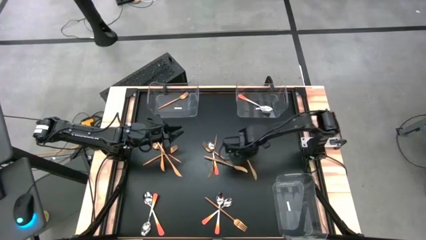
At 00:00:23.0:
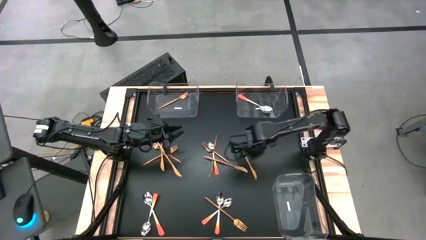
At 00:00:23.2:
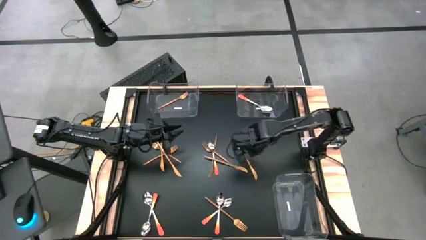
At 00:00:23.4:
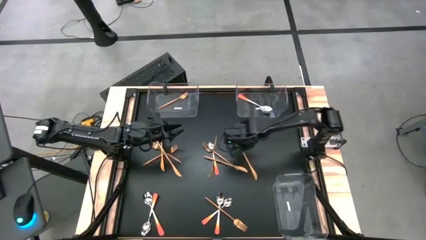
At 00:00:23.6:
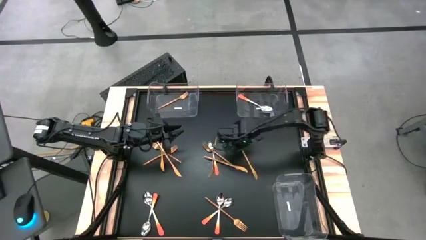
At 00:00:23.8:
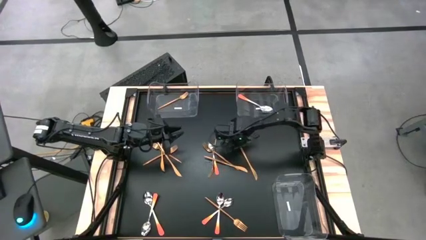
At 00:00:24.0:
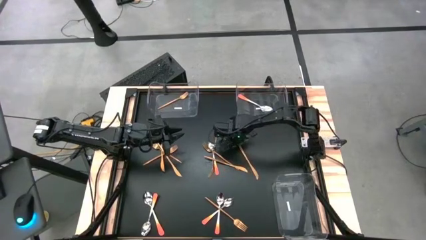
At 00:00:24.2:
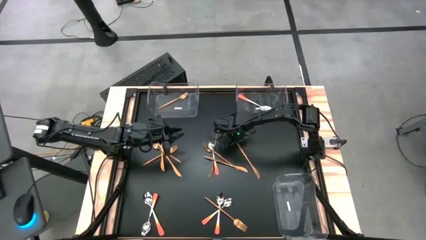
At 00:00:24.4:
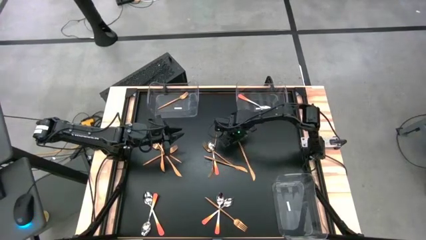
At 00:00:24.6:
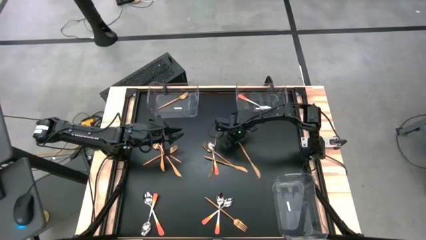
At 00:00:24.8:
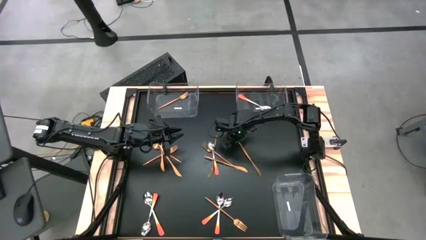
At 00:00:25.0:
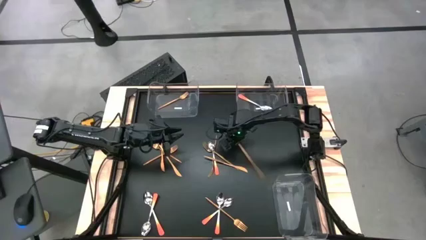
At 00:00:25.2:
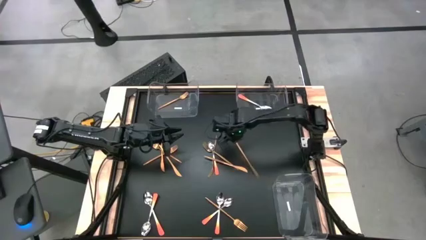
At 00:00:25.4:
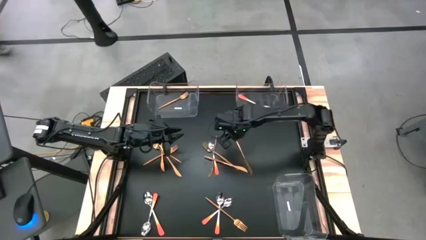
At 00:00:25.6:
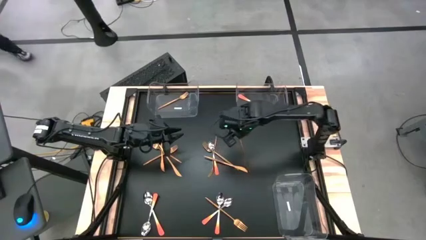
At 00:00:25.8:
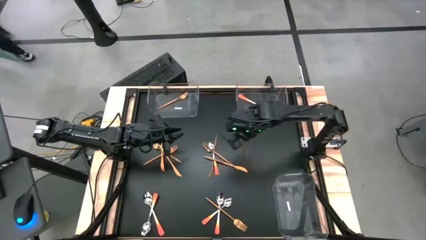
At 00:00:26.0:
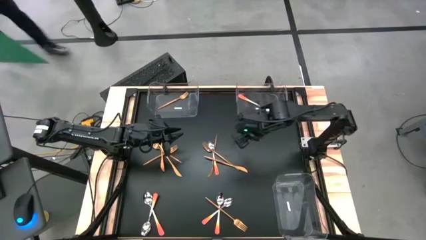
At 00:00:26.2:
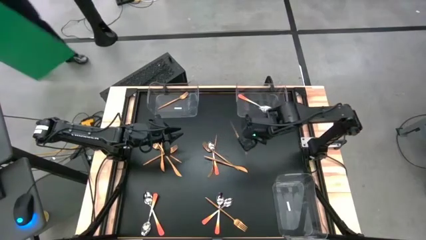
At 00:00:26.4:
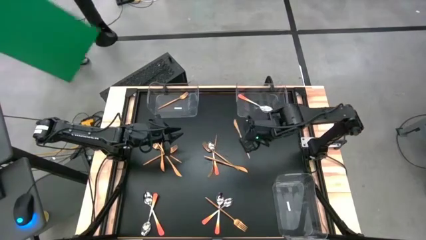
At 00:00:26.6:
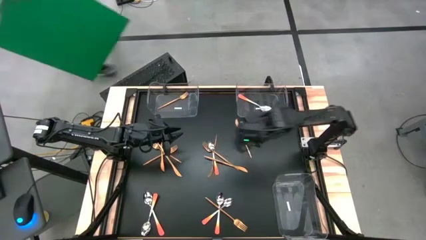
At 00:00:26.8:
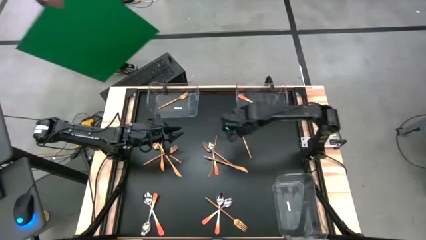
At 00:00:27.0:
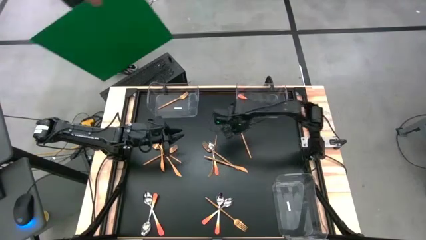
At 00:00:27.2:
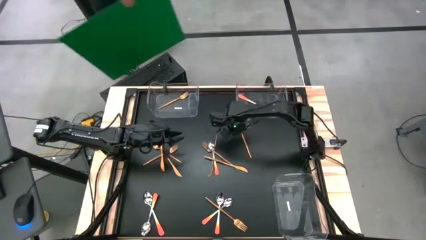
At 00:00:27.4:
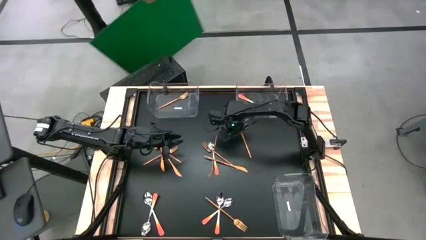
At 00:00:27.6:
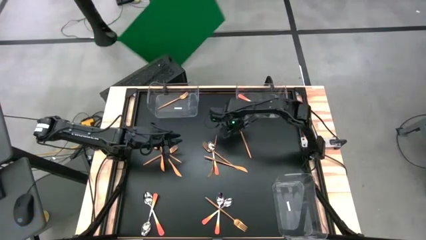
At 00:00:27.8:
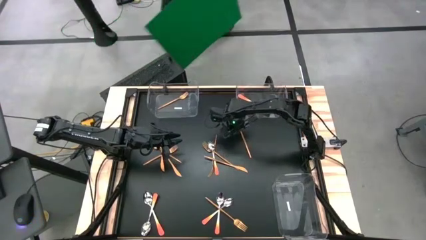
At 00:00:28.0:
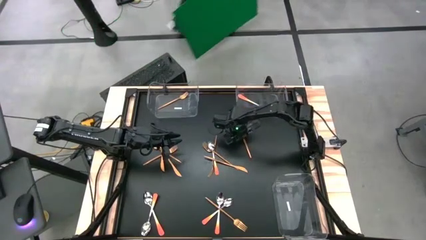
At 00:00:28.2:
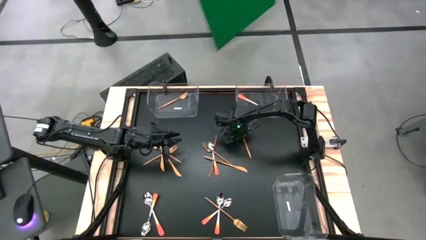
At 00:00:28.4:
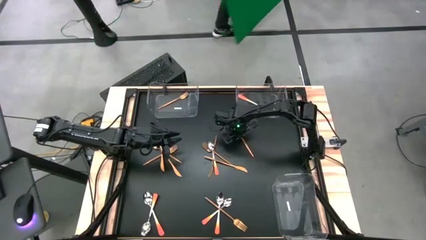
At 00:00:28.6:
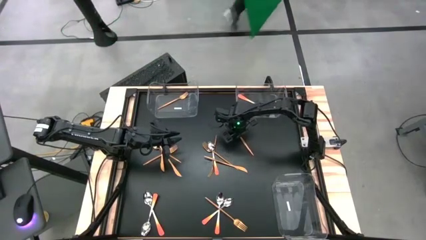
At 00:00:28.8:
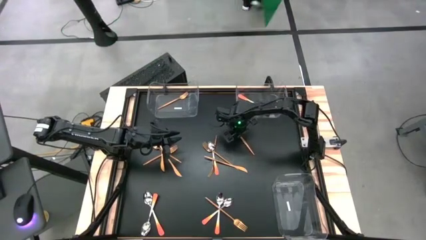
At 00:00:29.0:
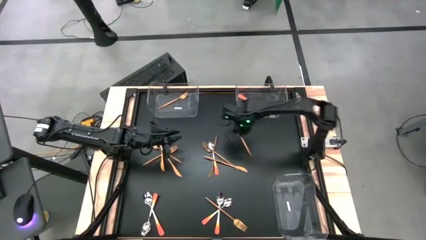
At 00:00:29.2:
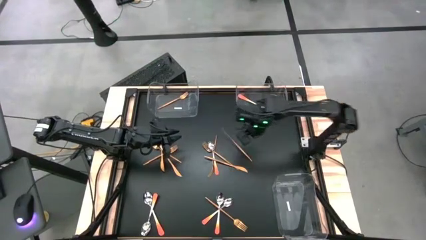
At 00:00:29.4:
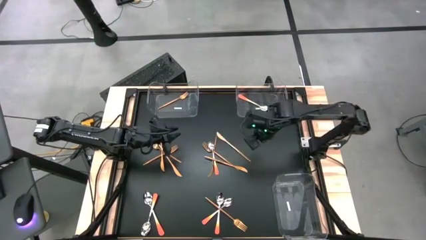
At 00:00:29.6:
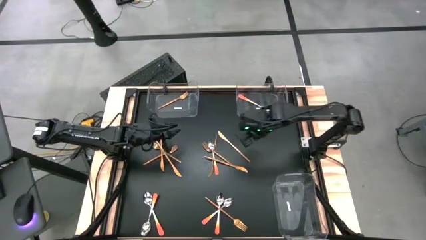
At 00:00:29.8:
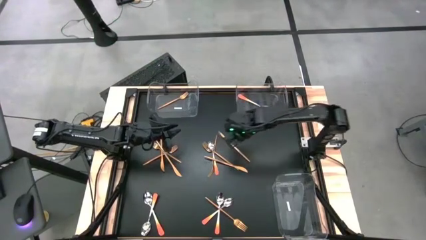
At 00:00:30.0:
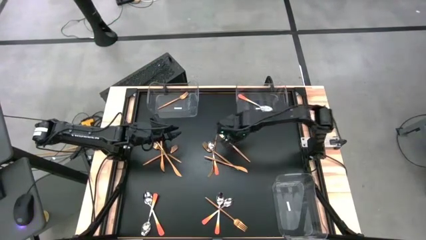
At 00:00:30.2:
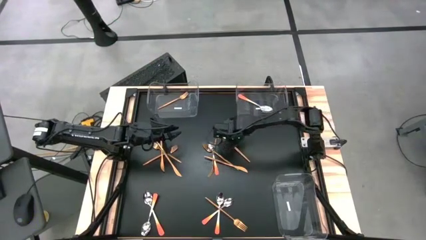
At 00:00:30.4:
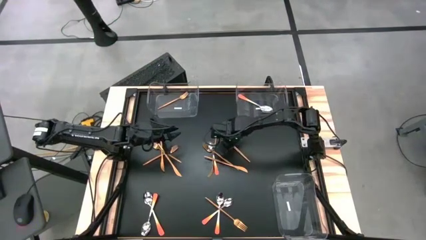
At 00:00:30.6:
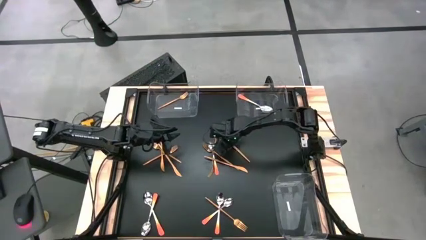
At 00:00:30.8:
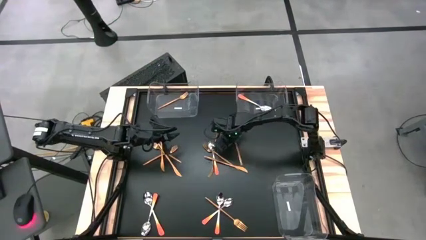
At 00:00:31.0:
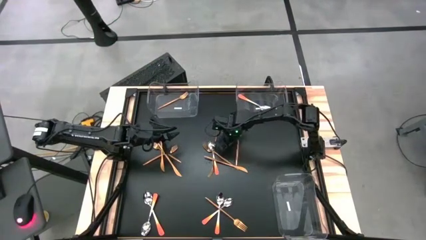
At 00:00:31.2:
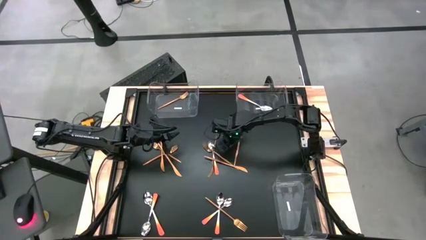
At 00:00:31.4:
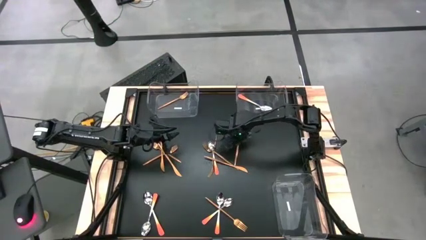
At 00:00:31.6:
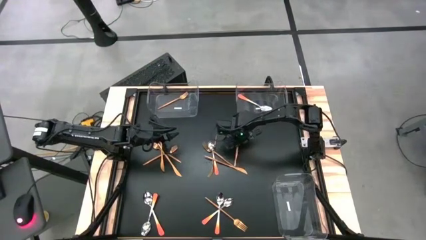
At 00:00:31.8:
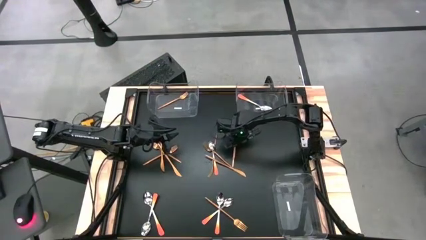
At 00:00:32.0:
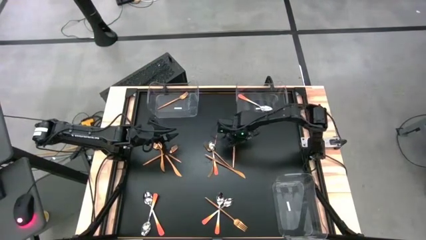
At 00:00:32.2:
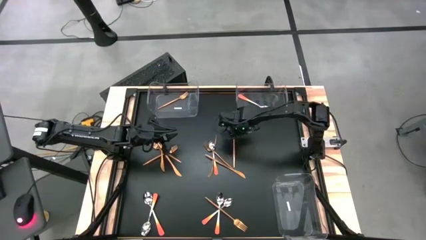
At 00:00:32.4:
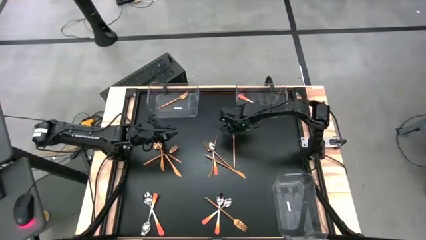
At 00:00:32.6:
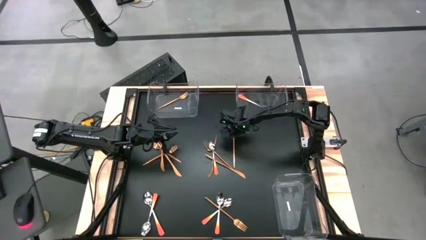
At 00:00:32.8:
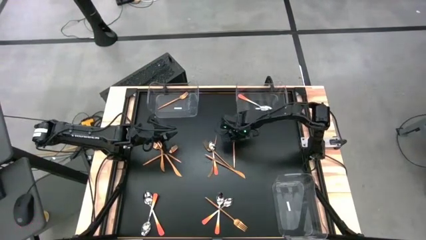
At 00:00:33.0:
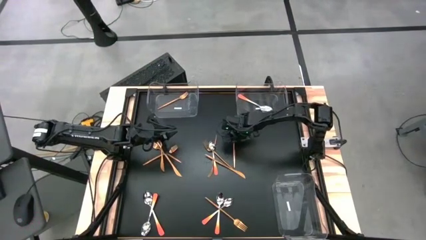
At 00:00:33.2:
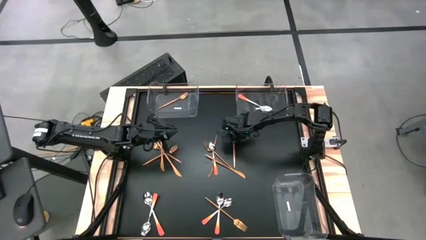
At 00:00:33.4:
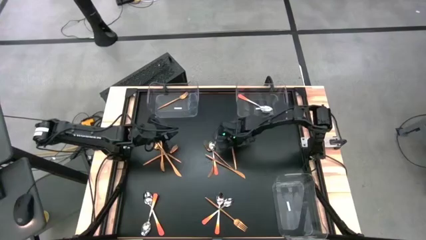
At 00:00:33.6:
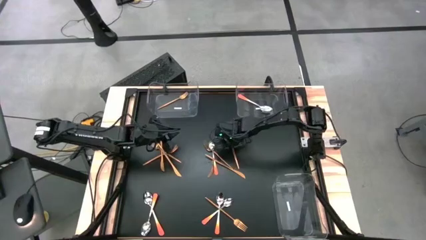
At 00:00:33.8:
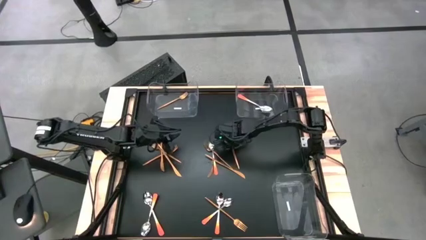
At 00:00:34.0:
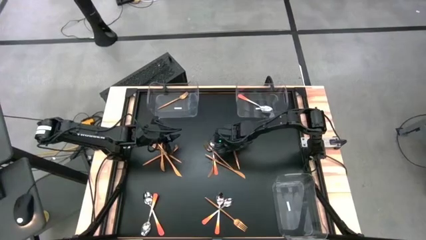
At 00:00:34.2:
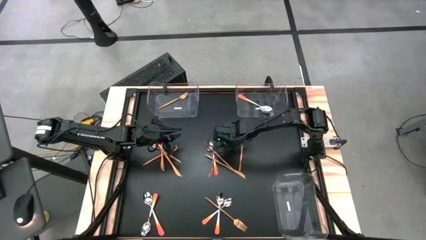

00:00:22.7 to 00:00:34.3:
Task: Sort silverware by color (type)
Put the gold table knife into the bottom left transparent bin

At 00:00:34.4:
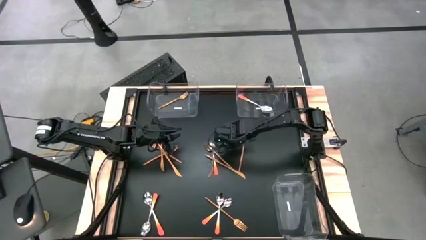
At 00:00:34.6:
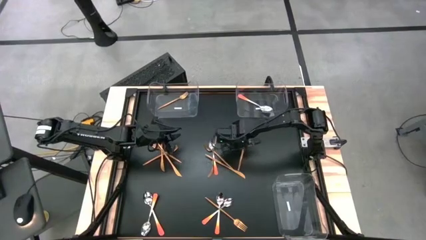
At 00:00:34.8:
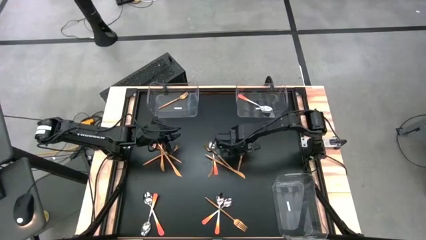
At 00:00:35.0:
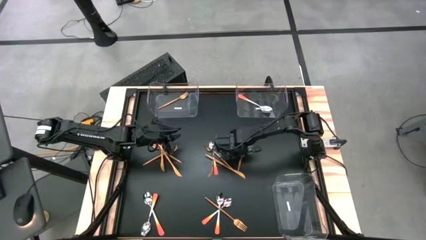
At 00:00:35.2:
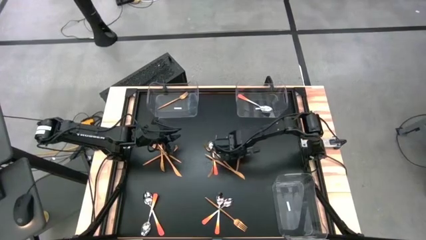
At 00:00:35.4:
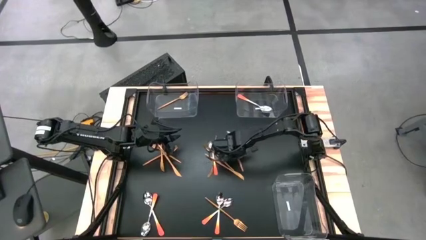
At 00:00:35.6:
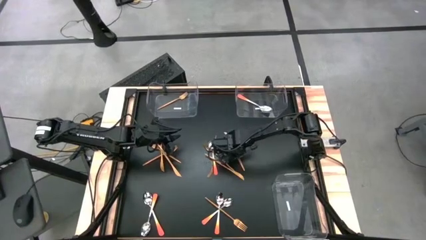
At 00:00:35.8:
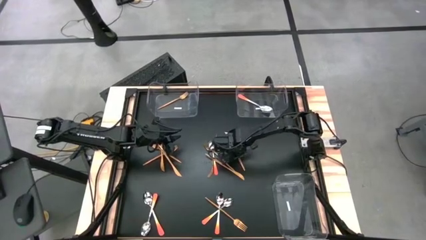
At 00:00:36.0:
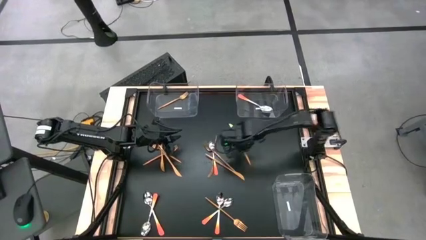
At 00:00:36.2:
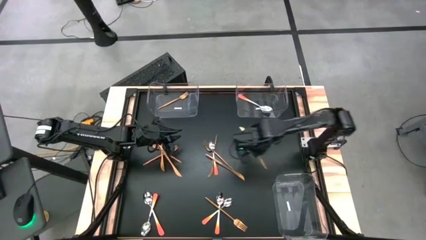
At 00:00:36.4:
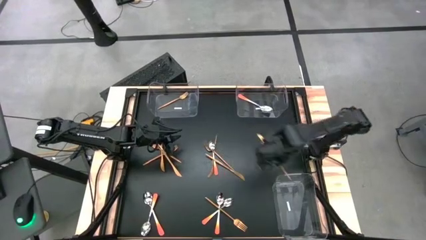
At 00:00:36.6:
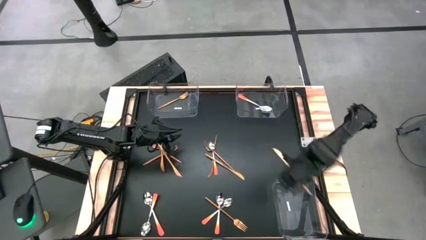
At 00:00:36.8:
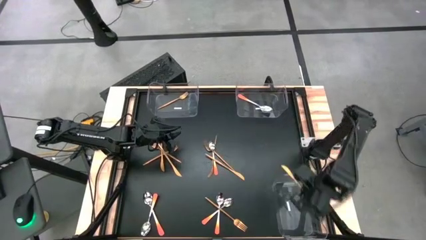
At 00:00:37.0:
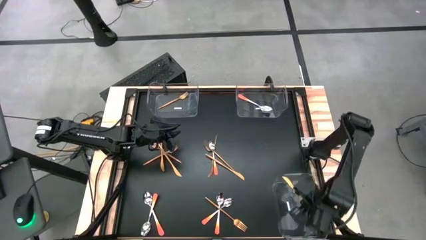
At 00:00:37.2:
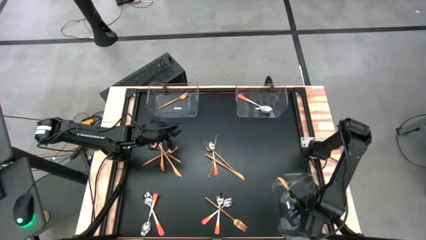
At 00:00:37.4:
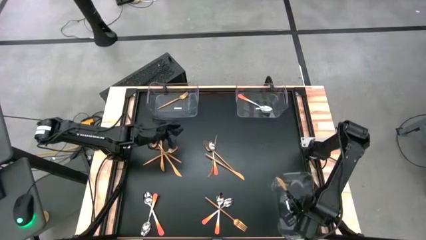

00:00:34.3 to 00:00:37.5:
Put the gold table knife into the bottom left transparent bin
